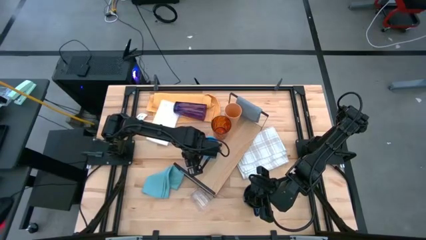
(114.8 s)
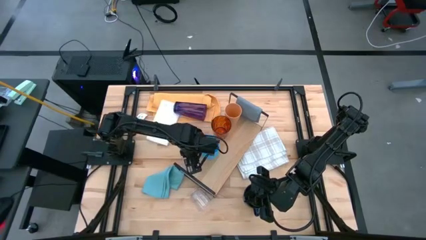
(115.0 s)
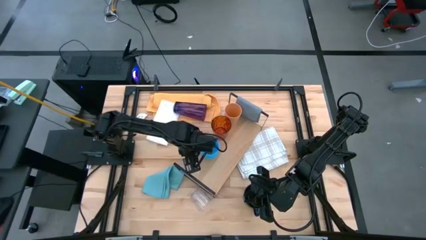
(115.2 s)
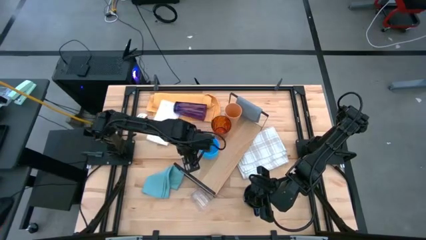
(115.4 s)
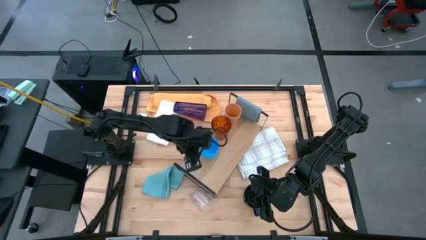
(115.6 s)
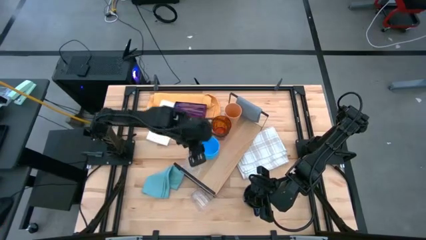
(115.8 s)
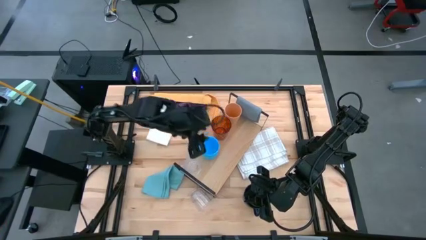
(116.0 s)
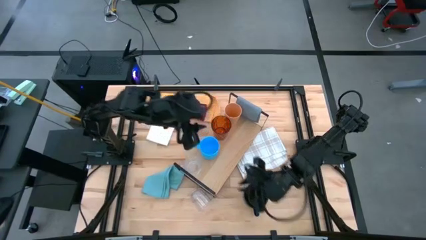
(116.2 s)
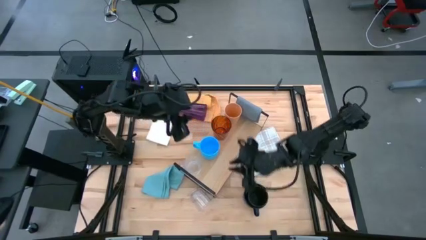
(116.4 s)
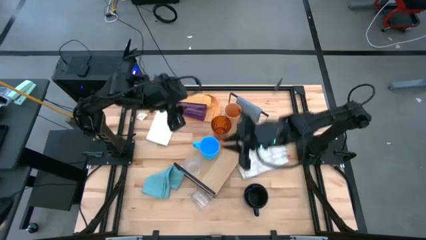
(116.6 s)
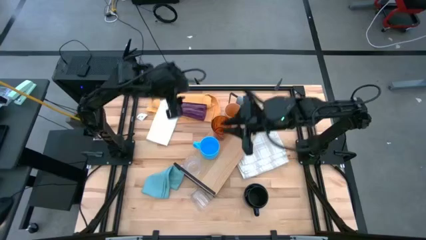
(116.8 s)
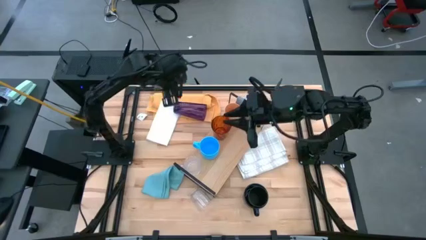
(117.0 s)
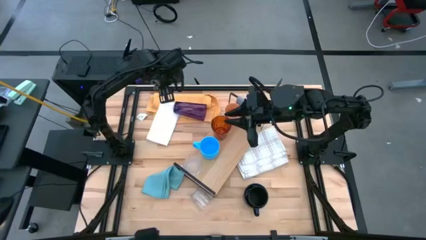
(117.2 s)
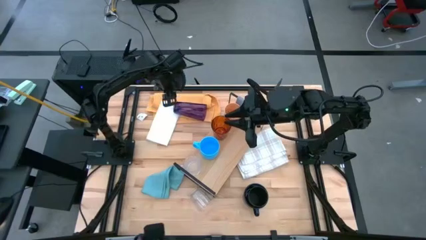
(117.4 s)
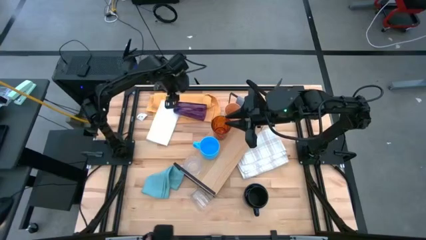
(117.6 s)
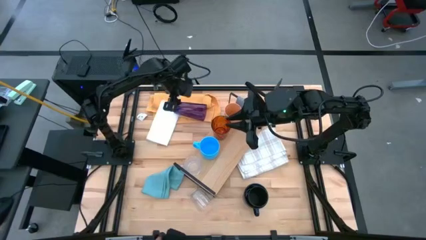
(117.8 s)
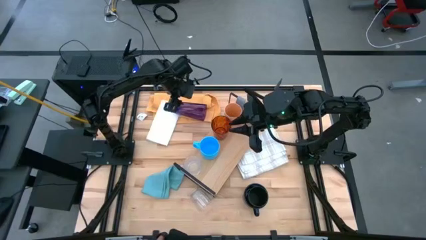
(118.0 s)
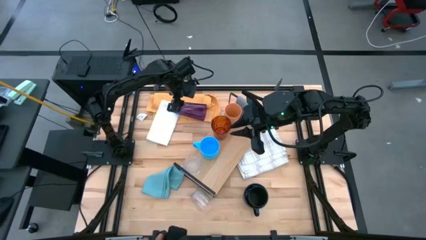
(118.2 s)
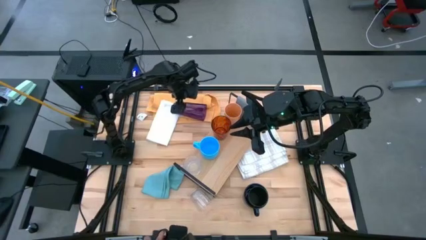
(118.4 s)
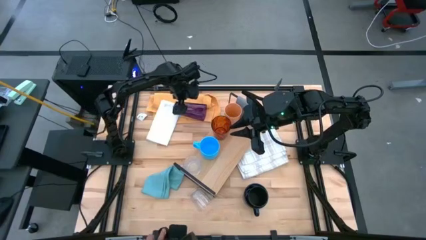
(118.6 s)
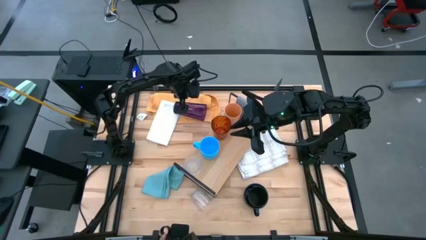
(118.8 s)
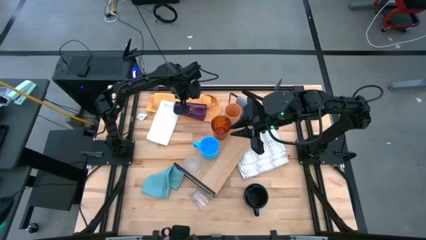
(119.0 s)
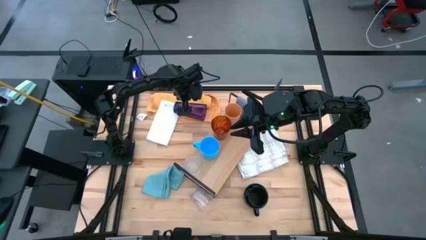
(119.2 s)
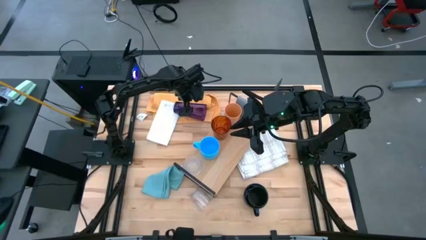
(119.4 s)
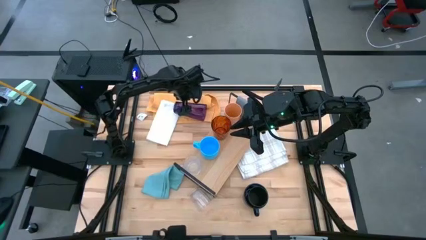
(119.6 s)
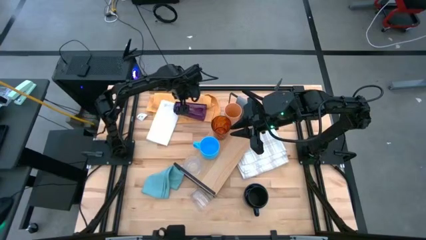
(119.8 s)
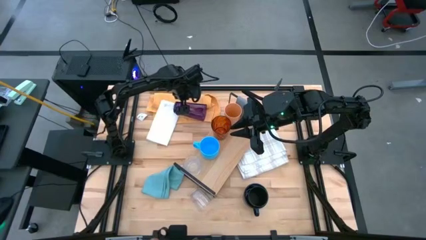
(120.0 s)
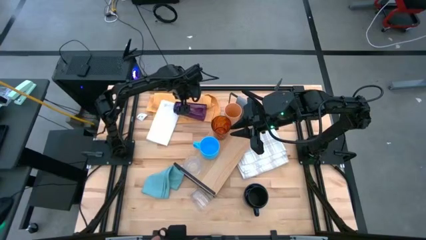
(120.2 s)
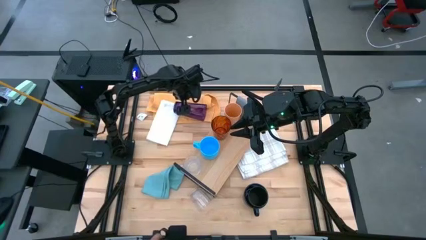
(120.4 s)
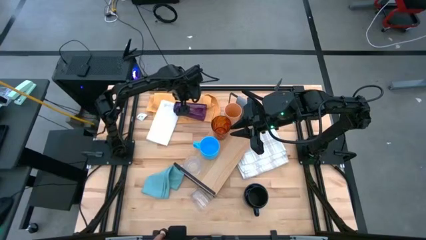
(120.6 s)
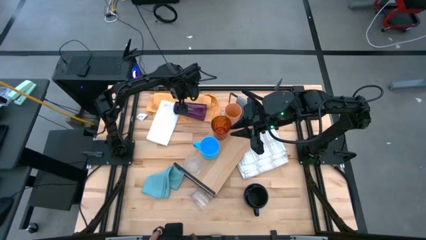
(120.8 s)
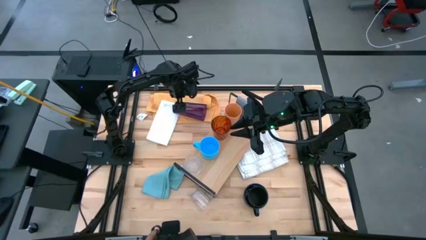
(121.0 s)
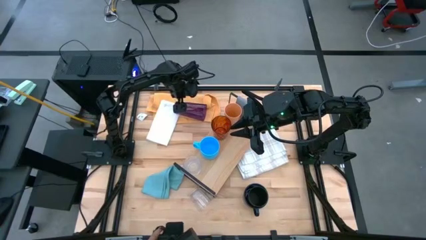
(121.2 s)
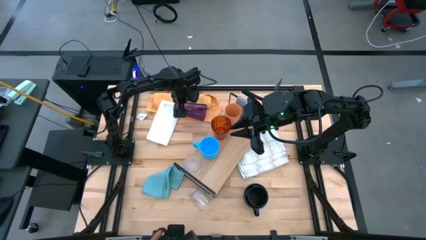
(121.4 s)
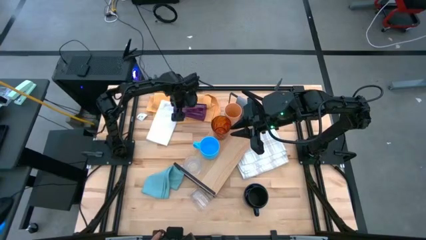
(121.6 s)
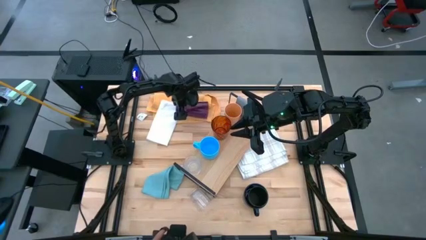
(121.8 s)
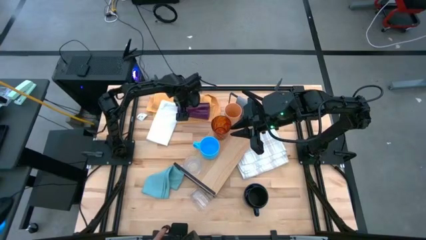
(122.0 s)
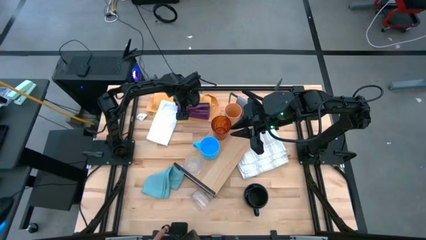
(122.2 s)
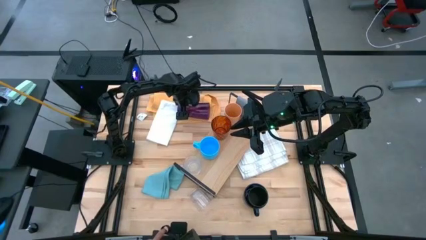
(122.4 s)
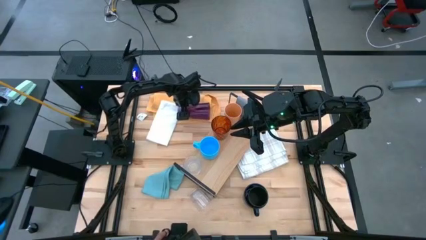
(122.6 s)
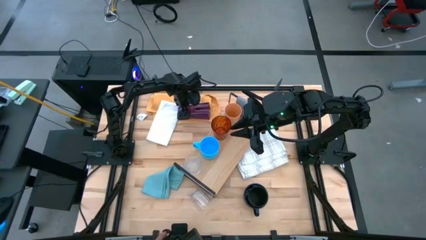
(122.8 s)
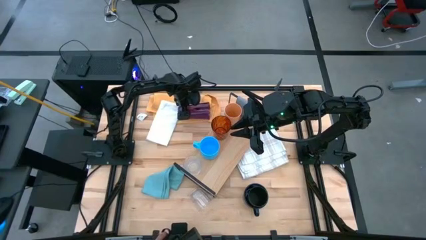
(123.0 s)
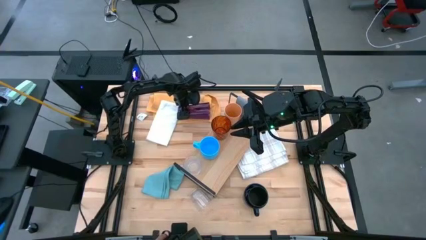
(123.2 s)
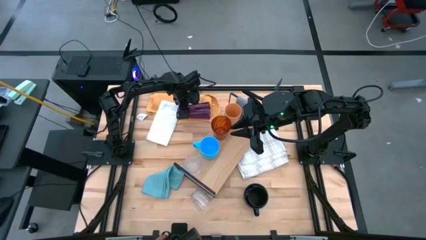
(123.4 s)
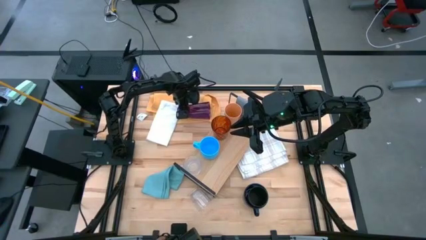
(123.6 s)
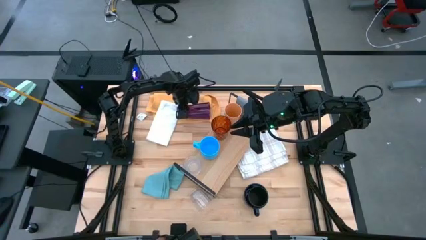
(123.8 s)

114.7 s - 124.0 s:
Task: Stack small to large cups/mugs on shelf
Put the violet glass on the shelf

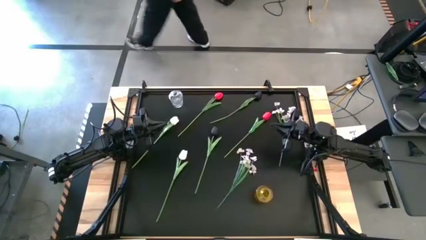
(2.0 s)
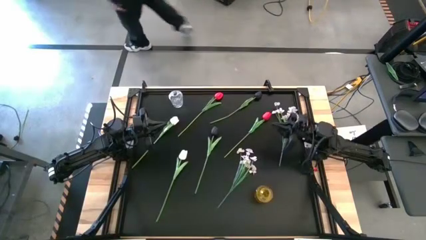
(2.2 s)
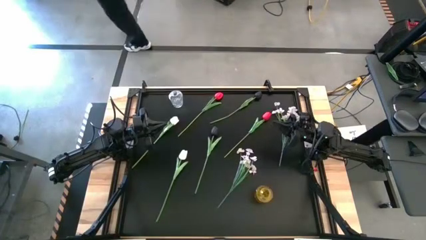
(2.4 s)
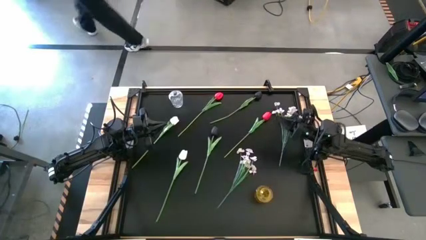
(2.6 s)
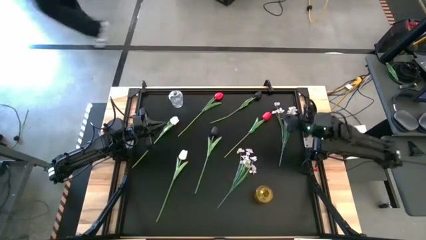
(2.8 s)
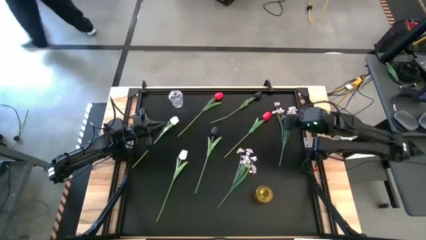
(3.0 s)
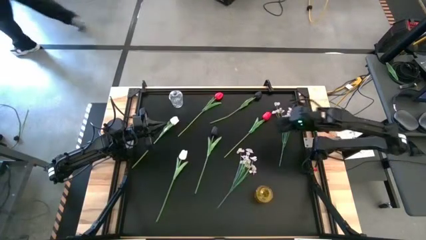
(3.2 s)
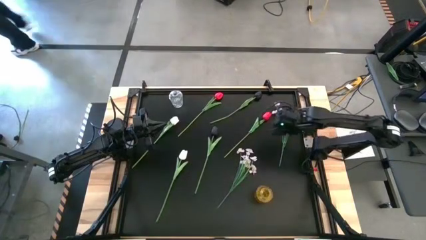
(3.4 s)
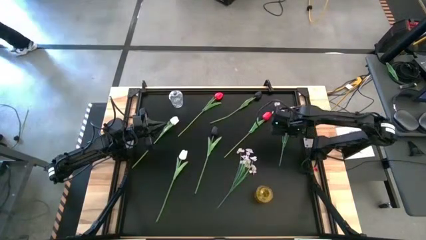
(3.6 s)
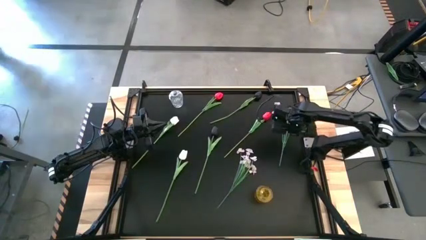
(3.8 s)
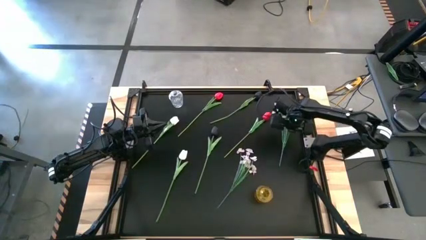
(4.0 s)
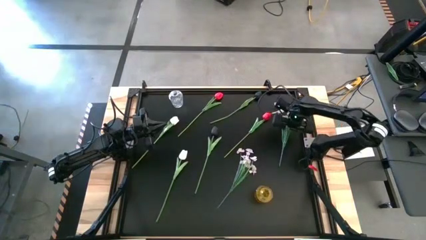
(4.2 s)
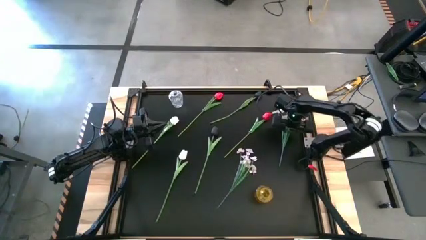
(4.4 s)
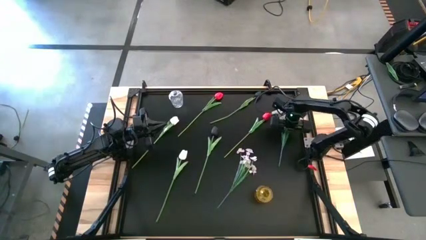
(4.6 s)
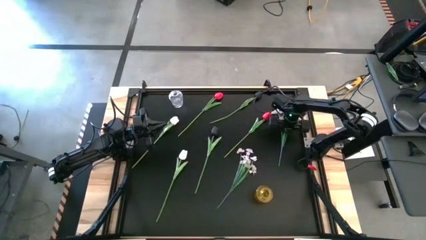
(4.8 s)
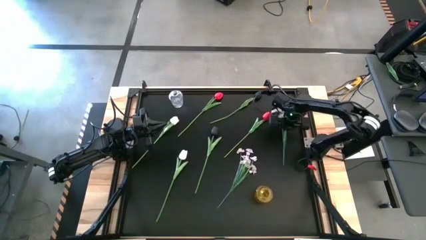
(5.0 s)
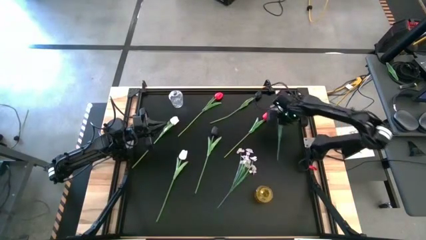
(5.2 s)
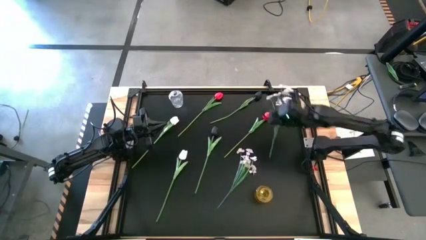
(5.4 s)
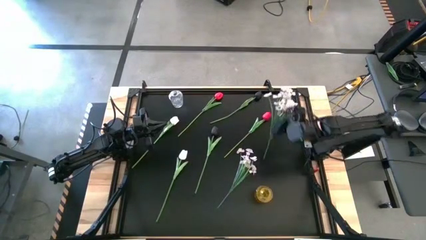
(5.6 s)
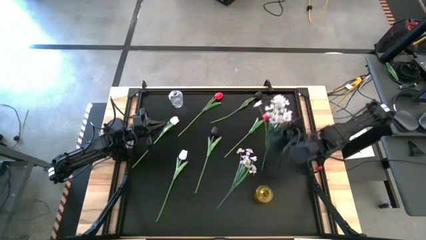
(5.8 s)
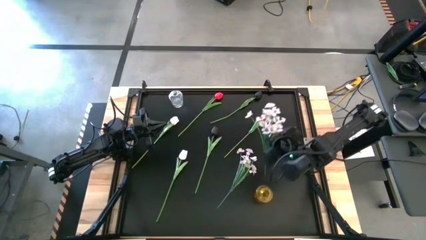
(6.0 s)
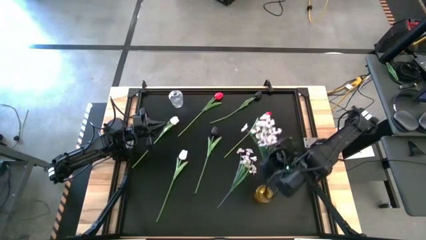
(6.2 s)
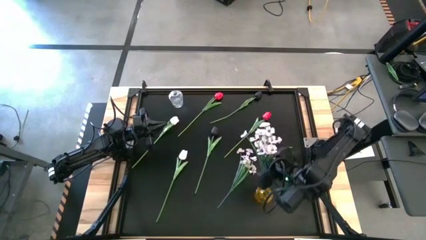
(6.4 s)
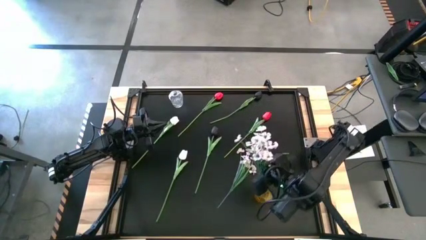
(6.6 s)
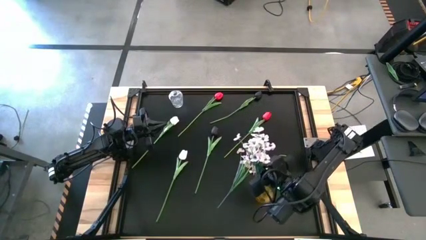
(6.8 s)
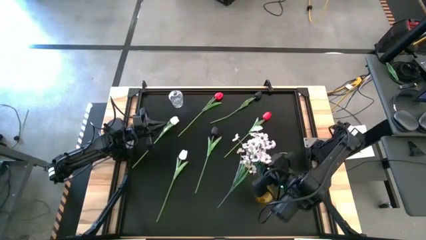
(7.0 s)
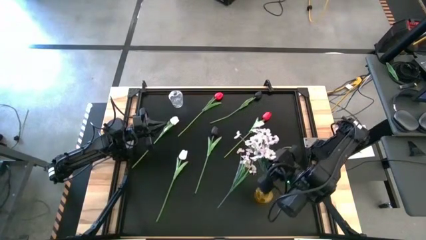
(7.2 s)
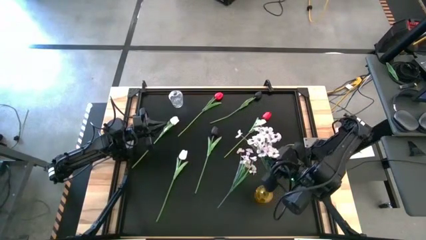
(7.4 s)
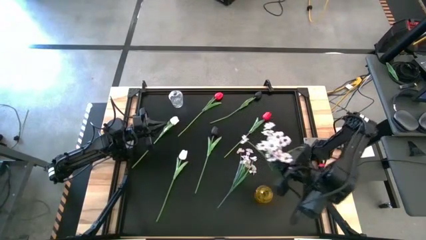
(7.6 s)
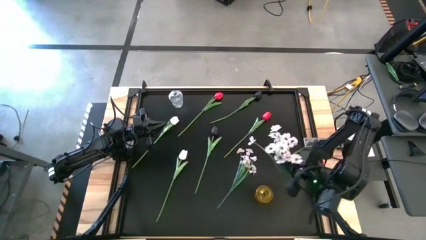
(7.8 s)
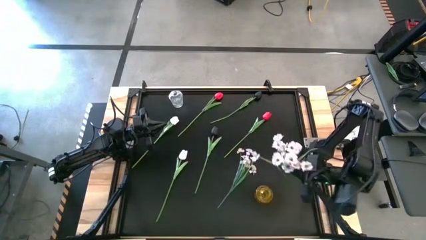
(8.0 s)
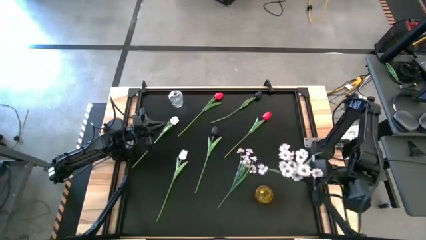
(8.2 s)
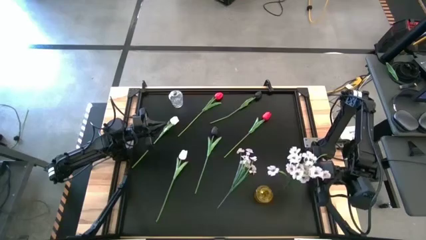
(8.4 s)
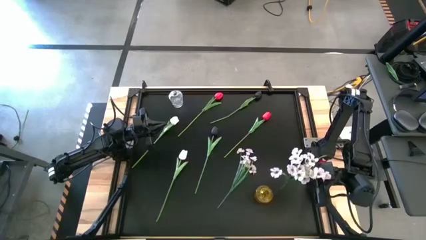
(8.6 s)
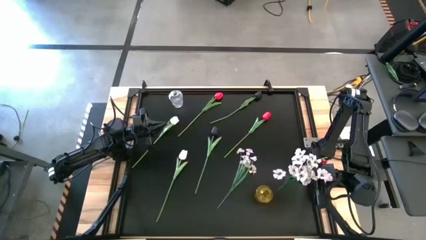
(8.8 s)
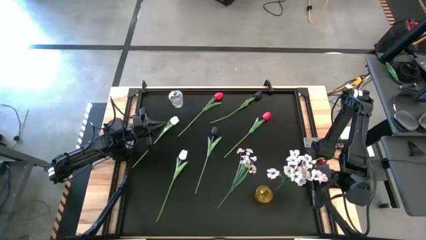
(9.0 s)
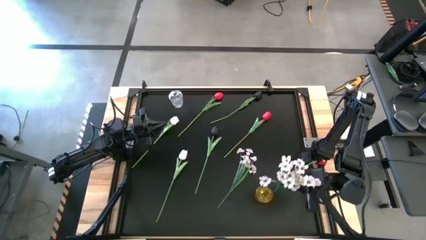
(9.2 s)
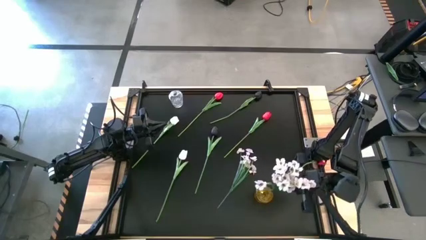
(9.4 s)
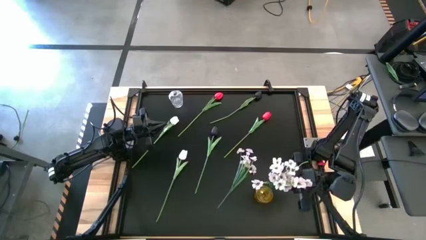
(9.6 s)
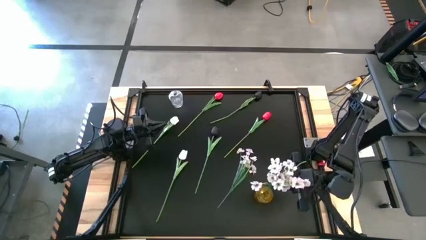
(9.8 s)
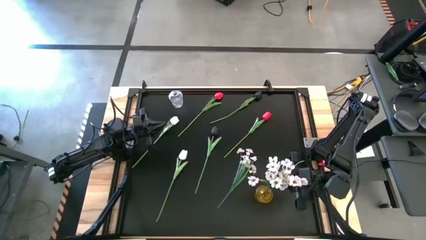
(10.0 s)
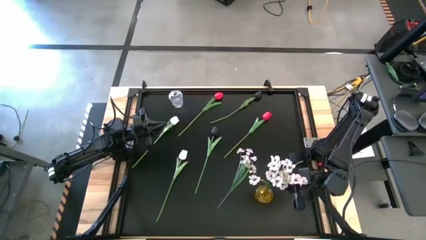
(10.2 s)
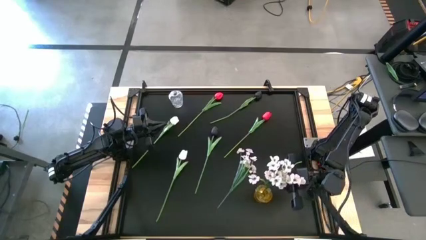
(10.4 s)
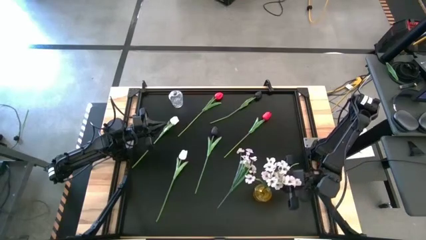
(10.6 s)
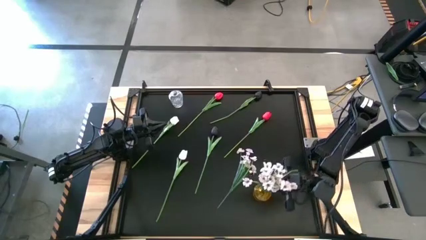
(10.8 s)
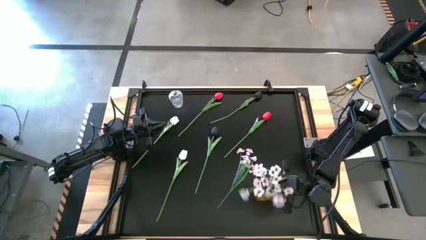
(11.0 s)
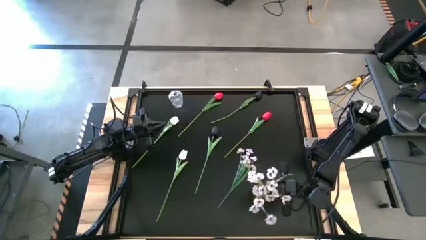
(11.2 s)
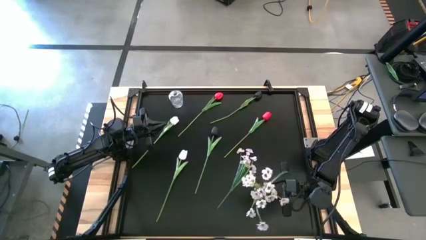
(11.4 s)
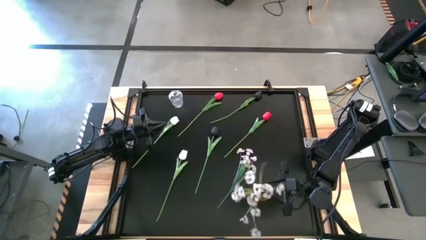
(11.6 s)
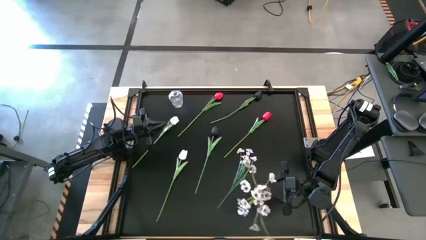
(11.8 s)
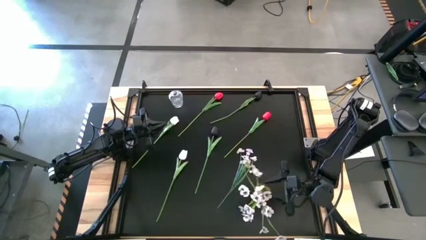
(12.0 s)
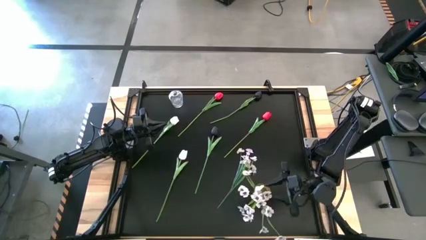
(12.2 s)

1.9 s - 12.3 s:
Task: Sort flowers into vase by color
Put the top right white flower into the yellow vase
